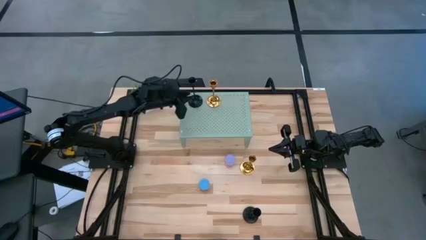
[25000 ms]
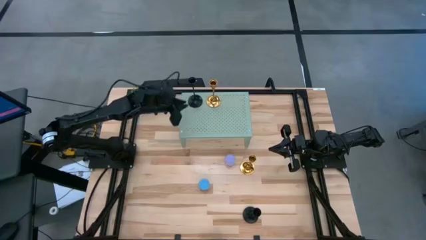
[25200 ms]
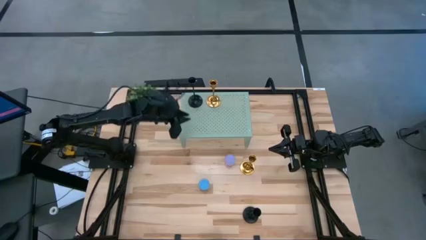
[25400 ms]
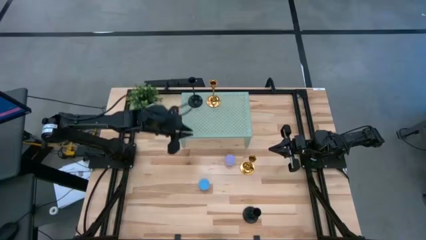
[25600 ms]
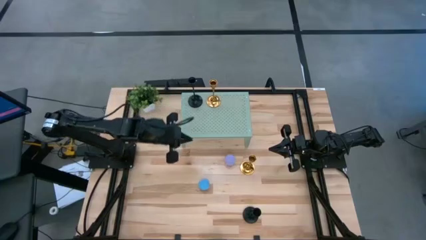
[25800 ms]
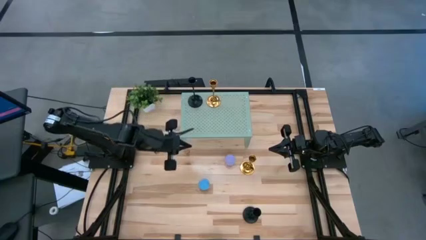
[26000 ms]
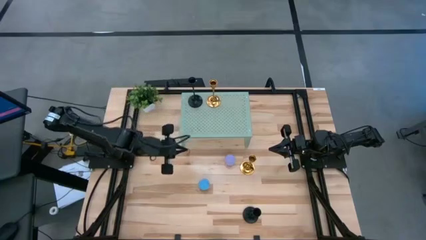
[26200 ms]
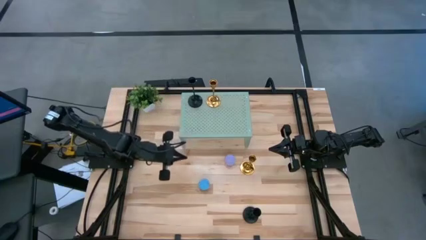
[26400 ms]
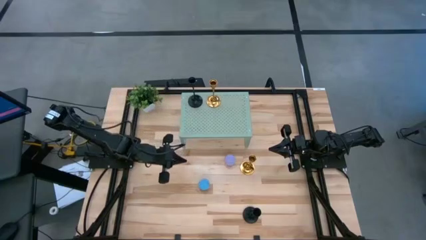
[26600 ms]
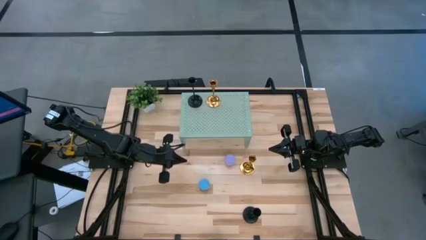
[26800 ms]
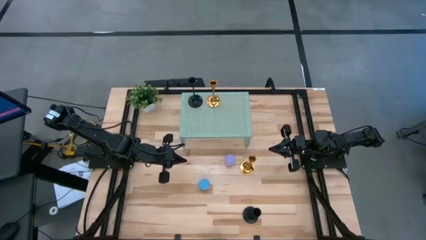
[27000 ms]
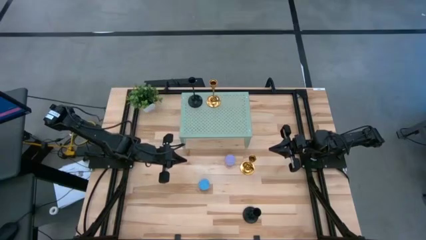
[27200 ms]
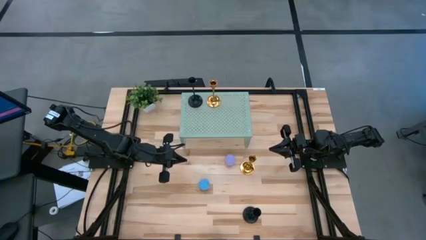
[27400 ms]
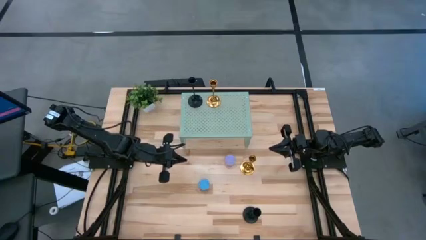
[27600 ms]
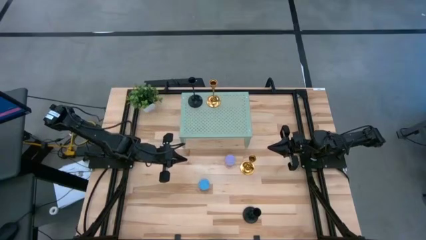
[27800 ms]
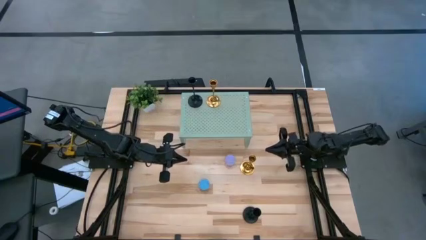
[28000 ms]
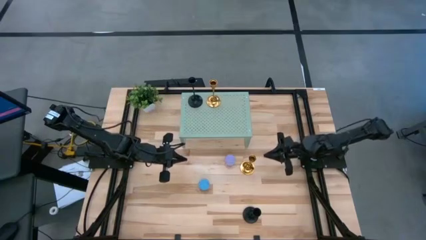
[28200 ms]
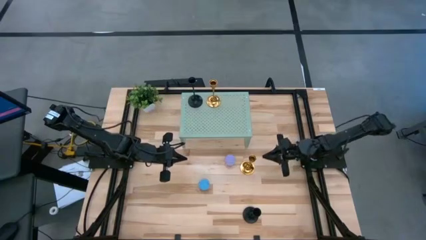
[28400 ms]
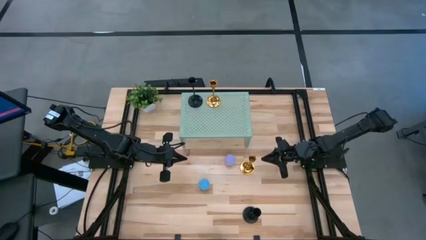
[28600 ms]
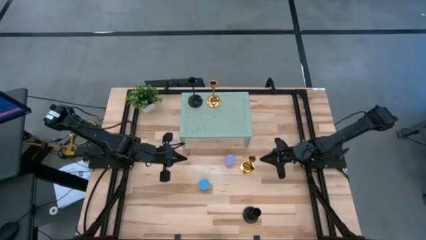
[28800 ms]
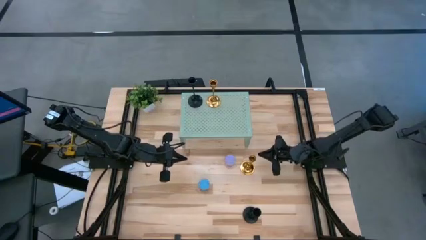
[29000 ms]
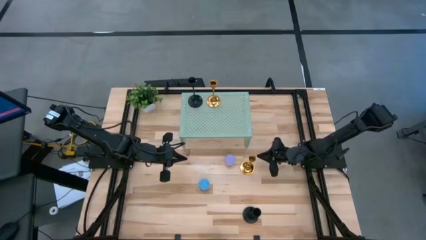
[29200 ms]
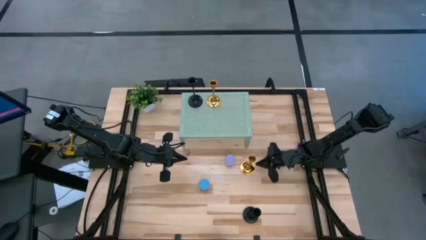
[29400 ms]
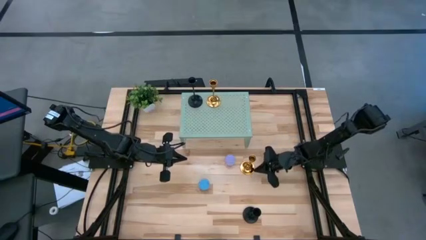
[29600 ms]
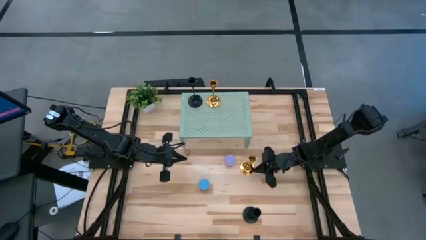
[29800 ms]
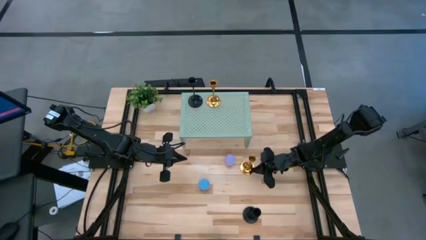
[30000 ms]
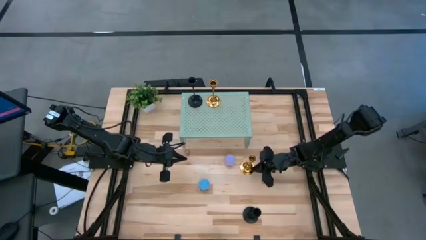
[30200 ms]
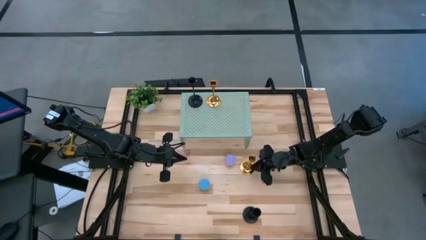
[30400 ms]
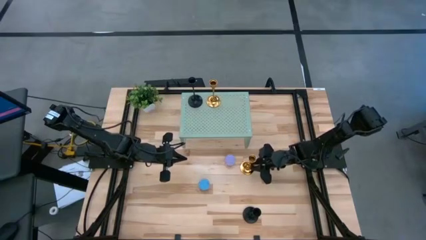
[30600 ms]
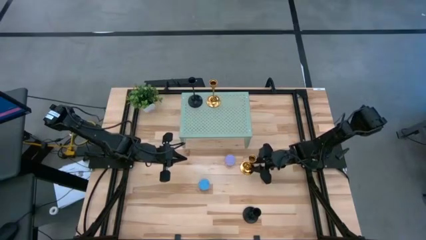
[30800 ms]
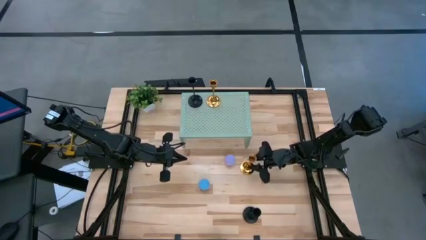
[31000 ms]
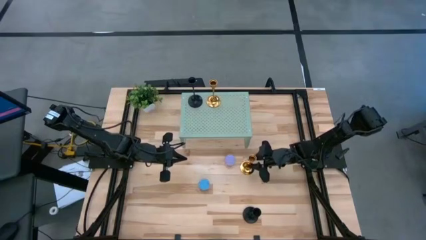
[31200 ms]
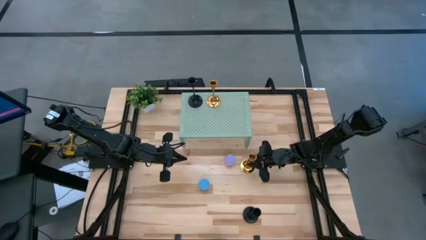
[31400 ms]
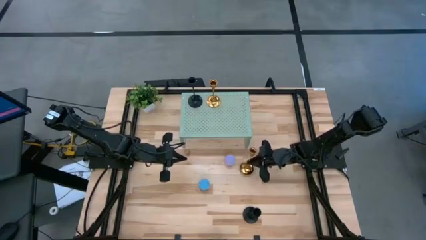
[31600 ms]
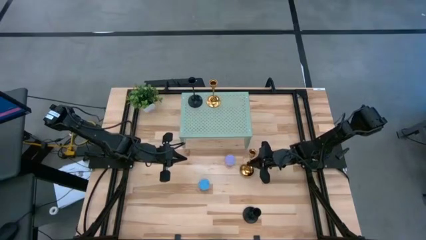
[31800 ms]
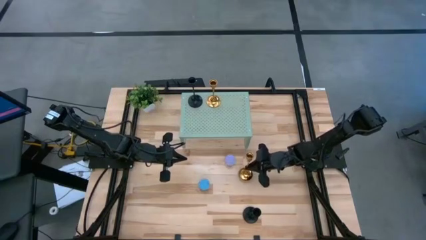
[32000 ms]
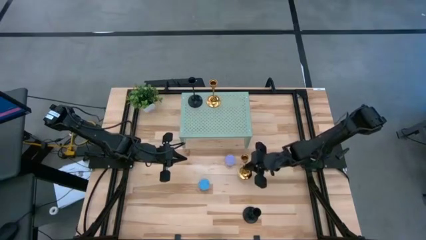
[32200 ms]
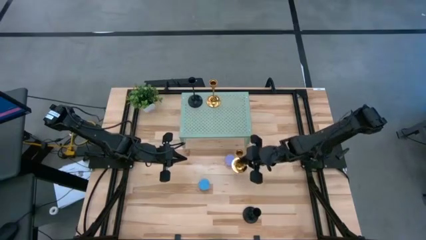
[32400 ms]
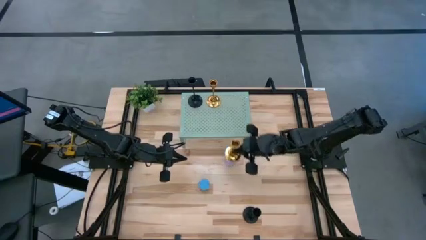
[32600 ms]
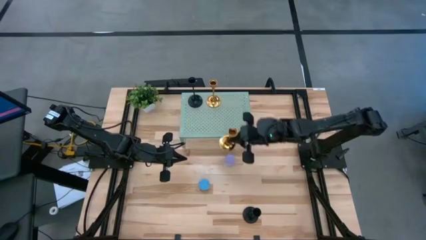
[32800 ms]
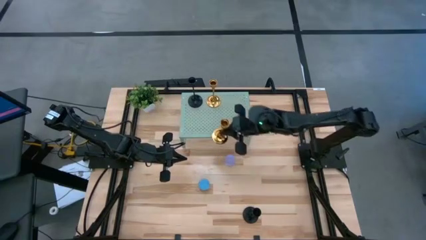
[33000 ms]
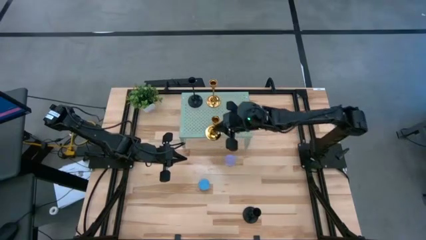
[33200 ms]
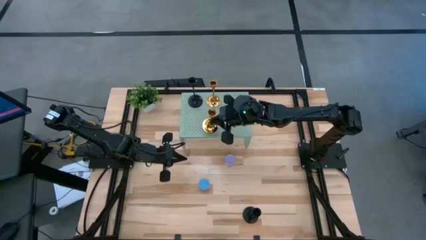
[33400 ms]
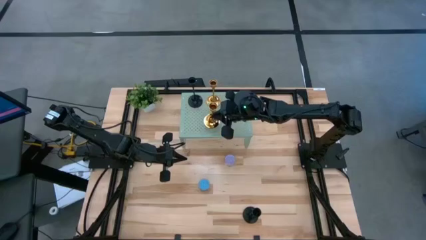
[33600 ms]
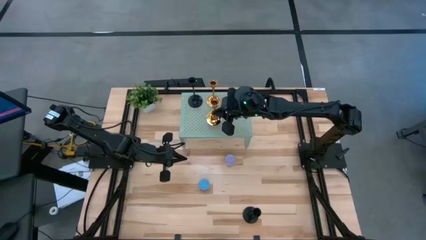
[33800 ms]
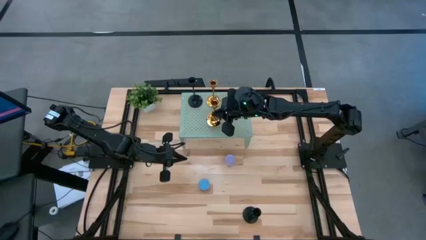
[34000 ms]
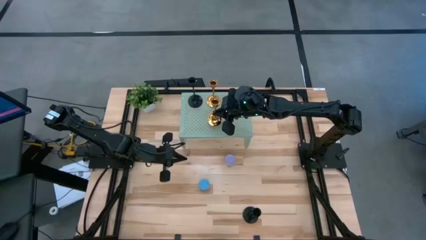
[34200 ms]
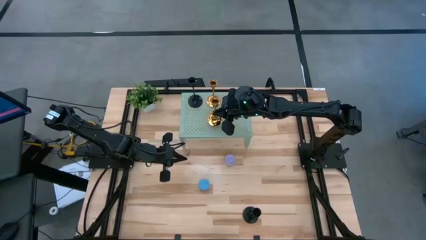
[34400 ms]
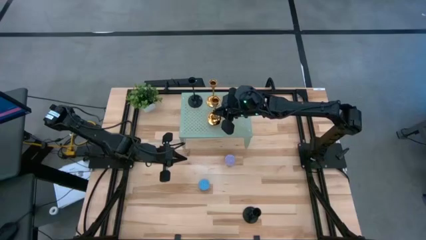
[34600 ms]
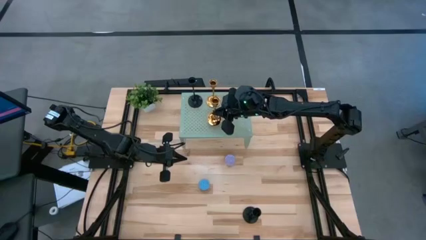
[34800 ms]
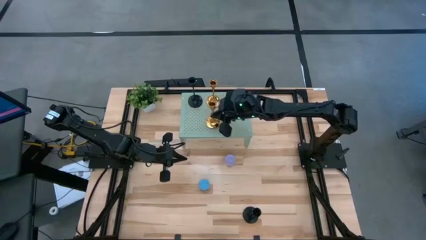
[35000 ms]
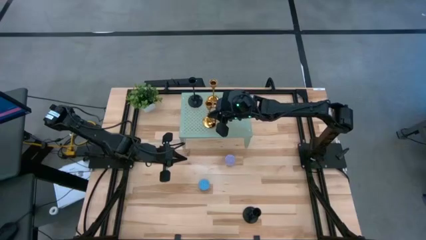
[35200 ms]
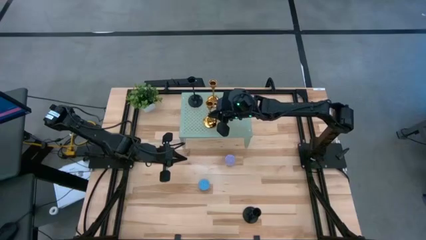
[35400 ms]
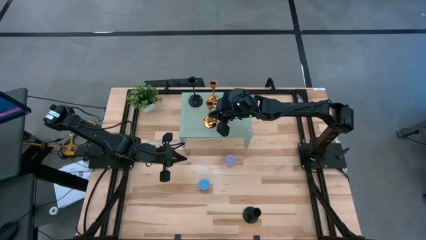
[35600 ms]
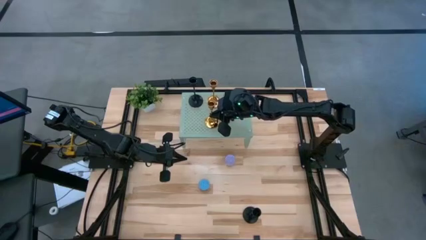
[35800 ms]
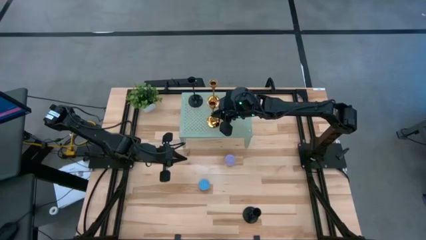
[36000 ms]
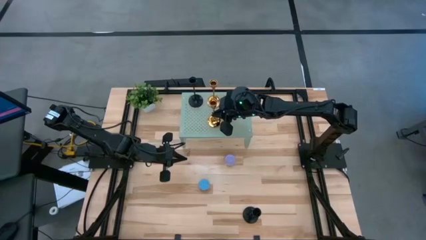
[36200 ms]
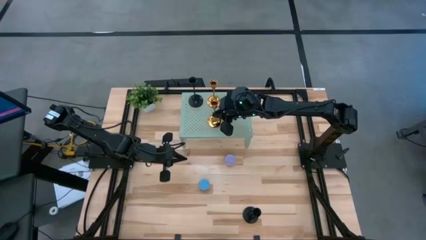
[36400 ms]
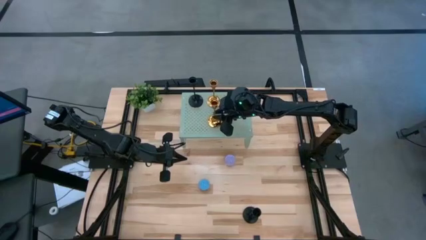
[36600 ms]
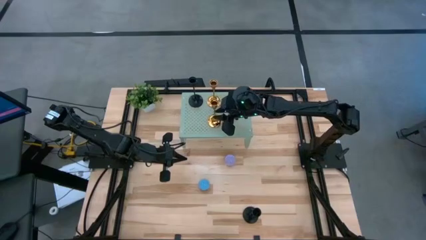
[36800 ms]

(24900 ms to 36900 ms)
Task: Pick & Place candle stick holders
Put the gold candle holder on the shelf aligned with the other gold candle holder
